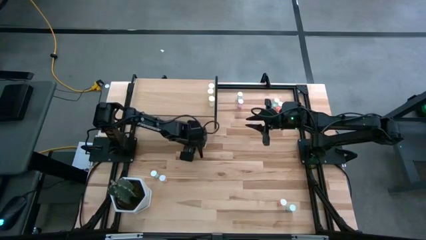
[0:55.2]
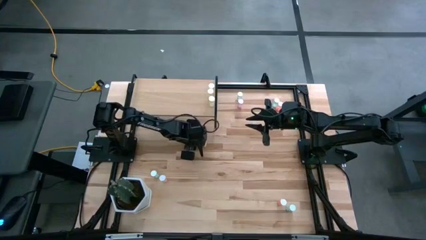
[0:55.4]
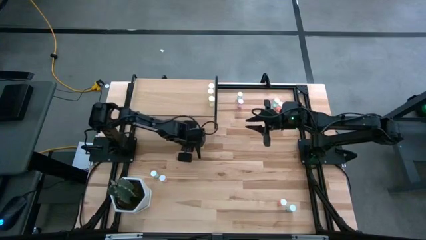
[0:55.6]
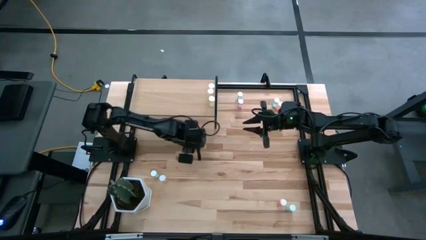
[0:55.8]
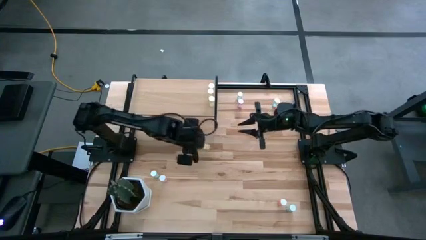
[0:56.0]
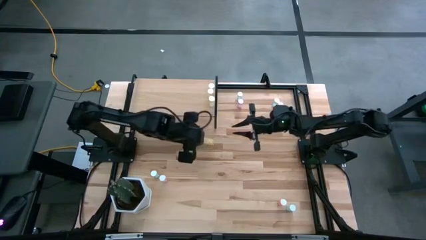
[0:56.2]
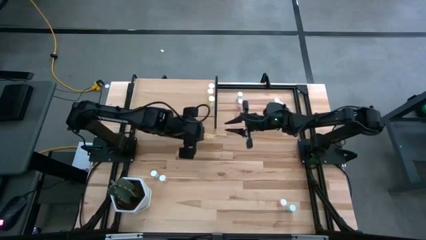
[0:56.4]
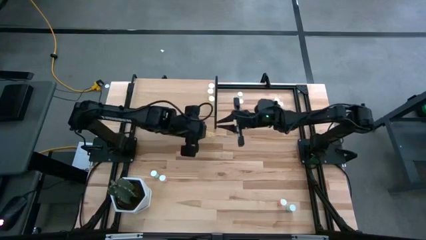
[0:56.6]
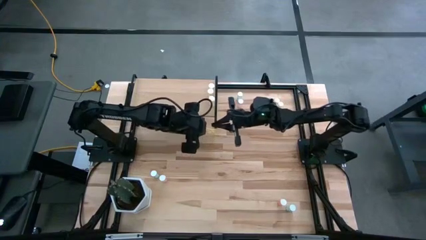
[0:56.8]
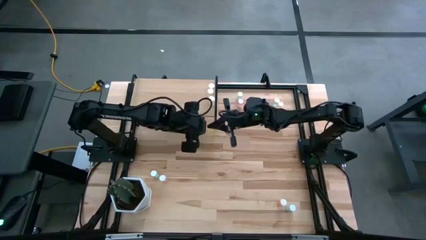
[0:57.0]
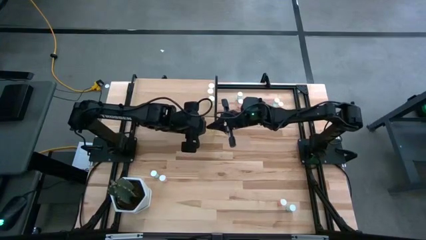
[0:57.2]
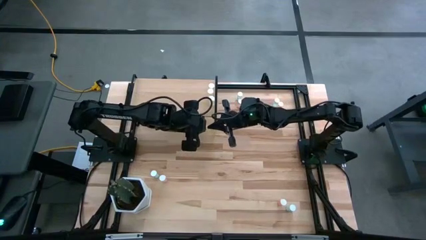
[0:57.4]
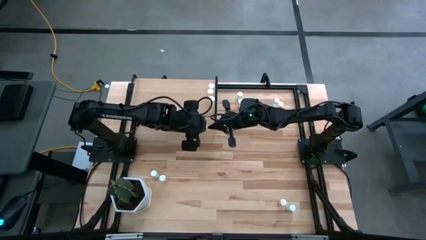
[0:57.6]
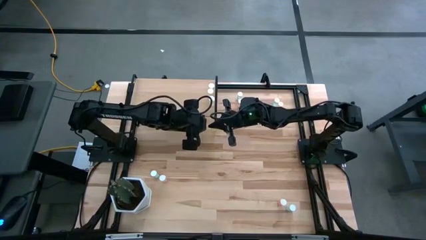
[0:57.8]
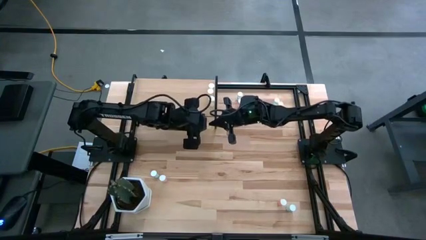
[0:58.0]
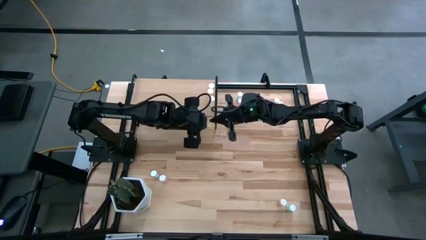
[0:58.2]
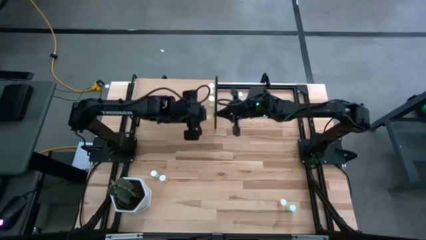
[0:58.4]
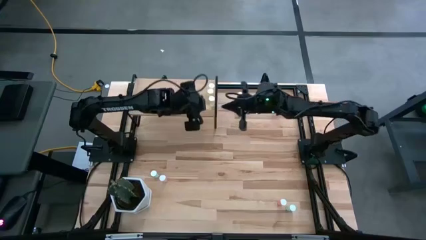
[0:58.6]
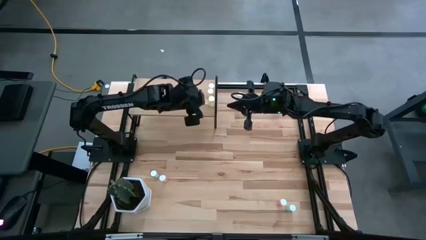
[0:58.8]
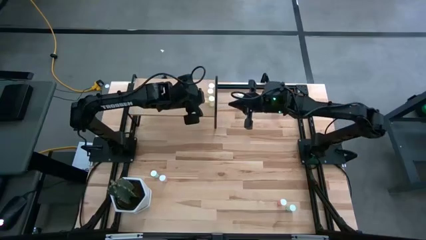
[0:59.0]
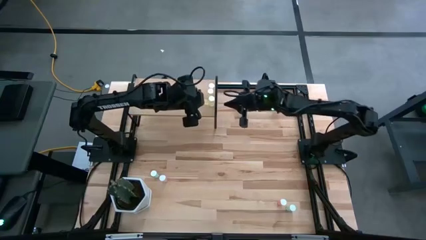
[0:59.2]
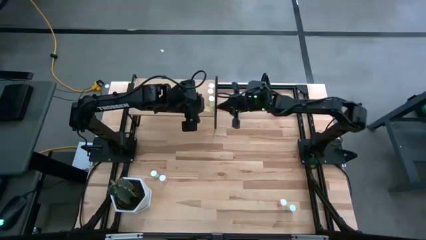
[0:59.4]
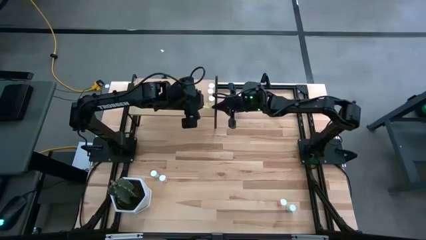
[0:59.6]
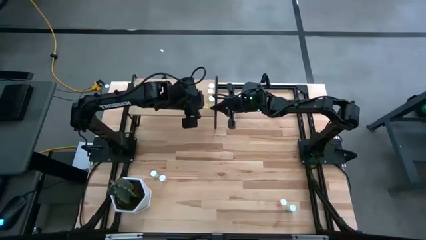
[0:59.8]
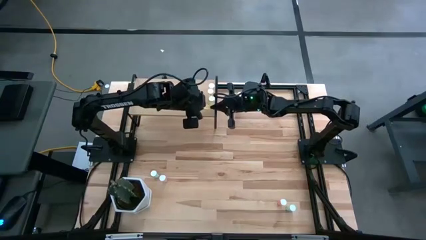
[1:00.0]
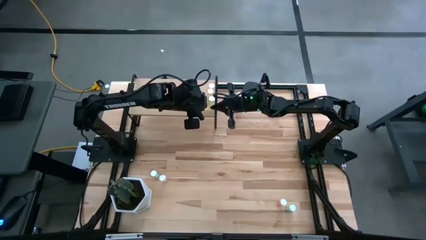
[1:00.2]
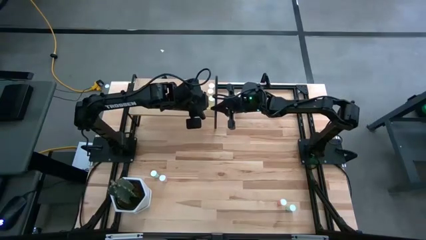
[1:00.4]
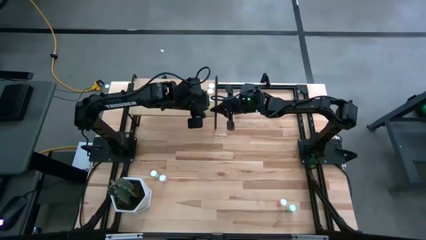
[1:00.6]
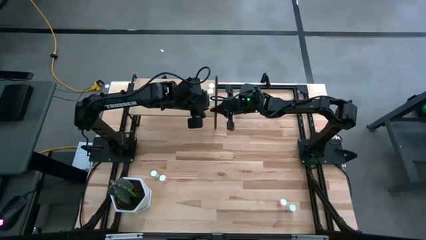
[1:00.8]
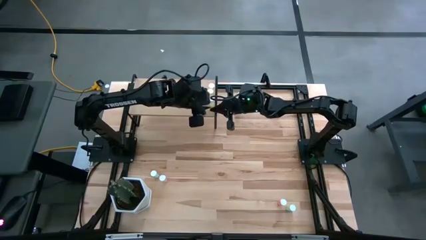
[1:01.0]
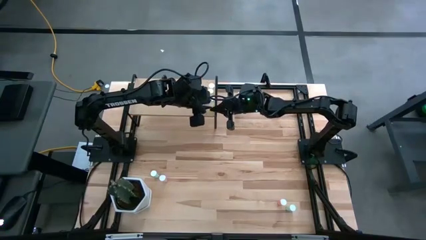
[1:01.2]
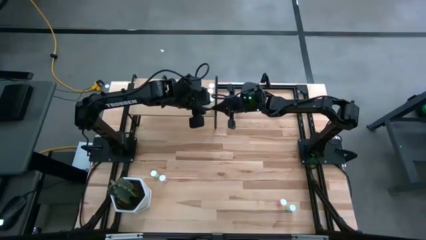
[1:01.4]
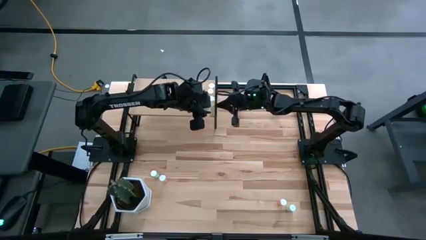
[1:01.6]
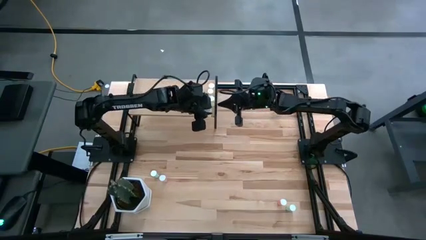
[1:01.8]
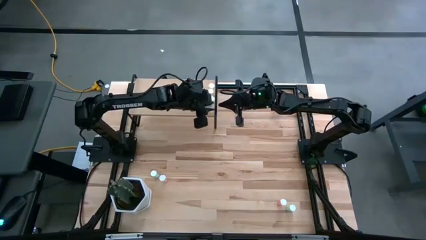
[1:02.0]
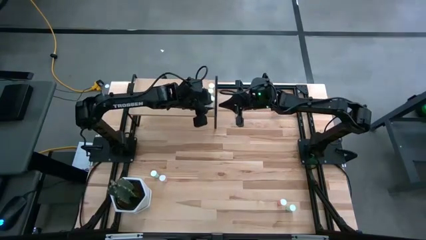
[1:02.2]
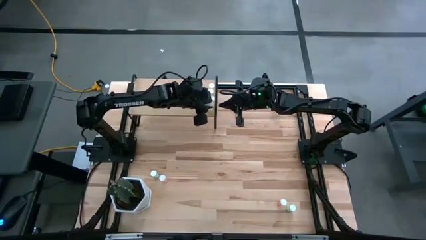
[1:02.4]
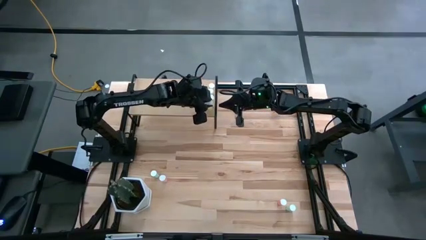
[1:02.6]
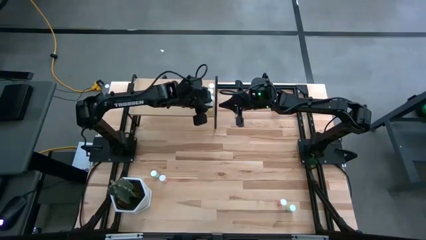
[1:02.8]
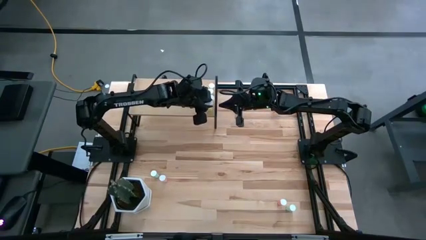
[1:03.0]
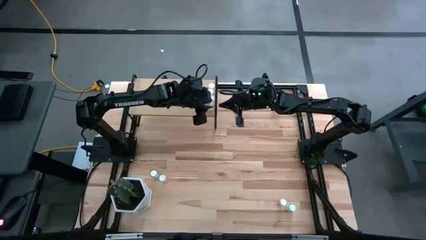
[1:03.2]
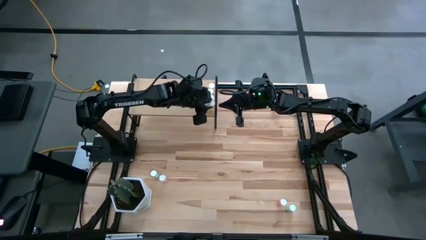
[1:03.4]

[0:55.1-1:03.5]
Task: Pick and place medicine bottles onto shelf by color
Put the yellow pill bottle on the shelf

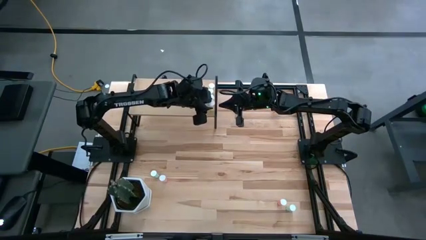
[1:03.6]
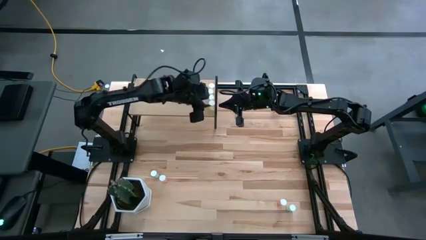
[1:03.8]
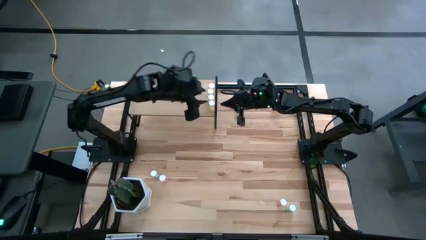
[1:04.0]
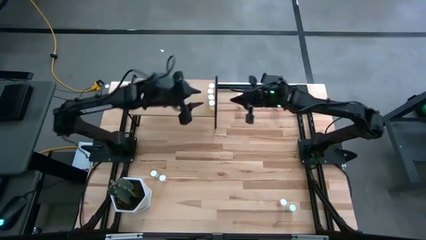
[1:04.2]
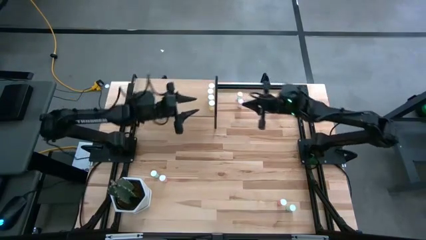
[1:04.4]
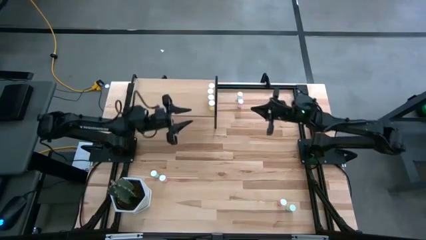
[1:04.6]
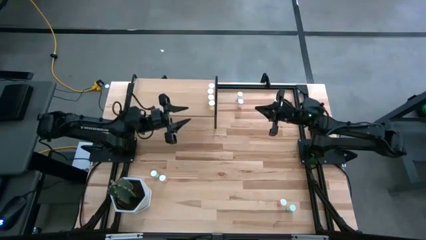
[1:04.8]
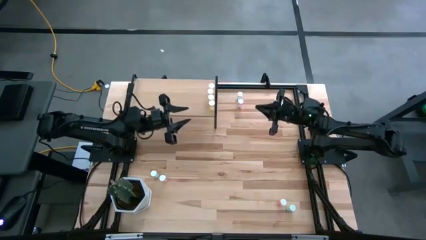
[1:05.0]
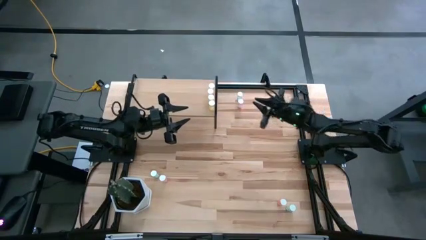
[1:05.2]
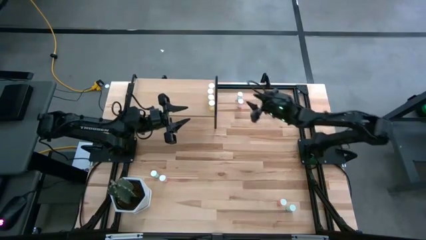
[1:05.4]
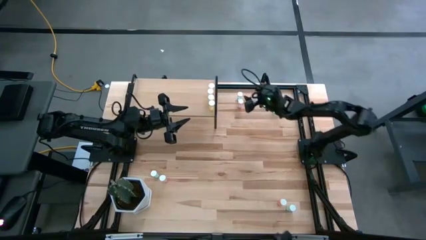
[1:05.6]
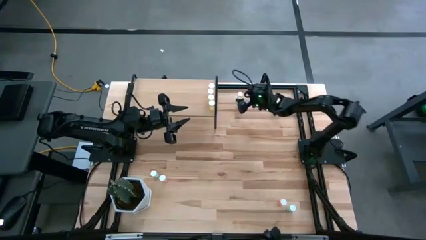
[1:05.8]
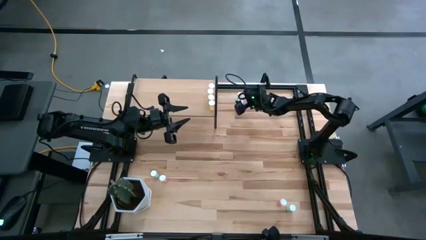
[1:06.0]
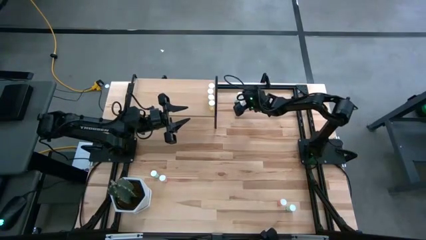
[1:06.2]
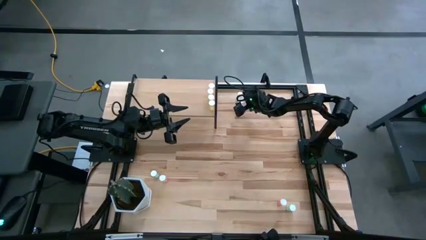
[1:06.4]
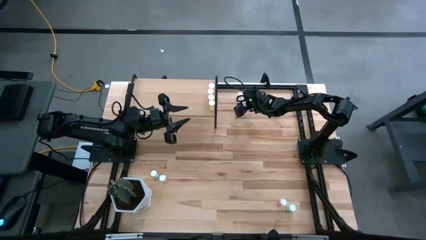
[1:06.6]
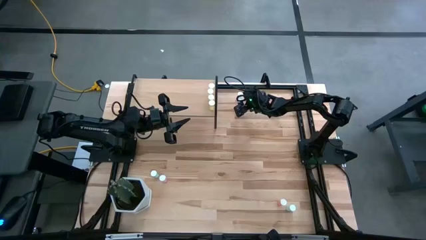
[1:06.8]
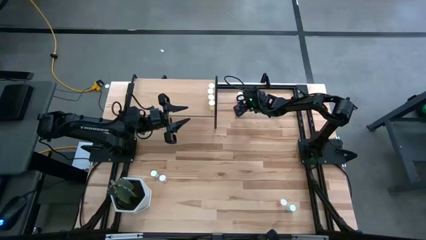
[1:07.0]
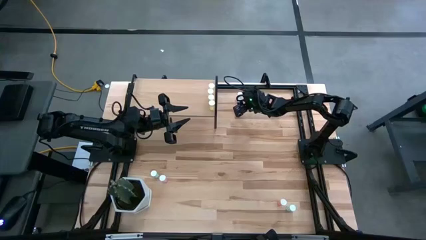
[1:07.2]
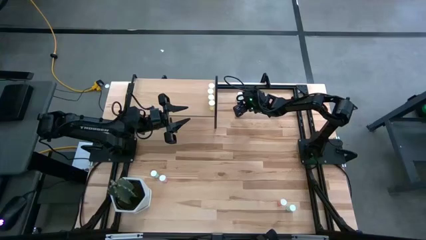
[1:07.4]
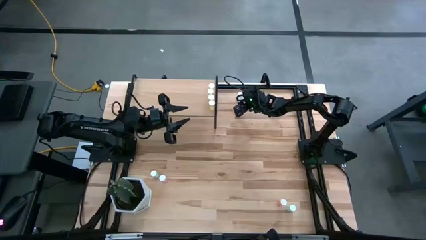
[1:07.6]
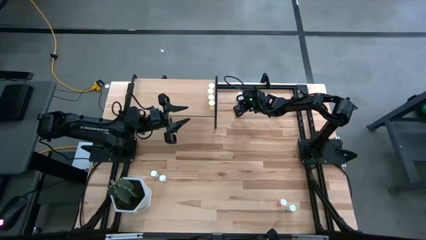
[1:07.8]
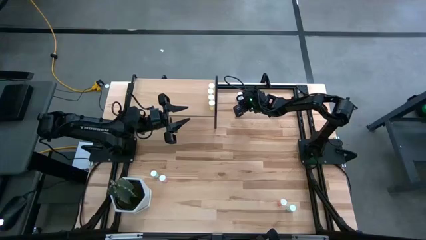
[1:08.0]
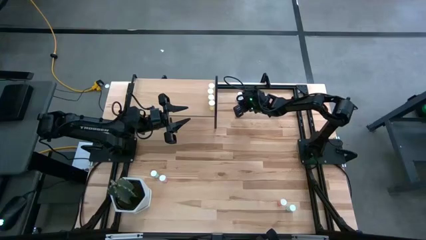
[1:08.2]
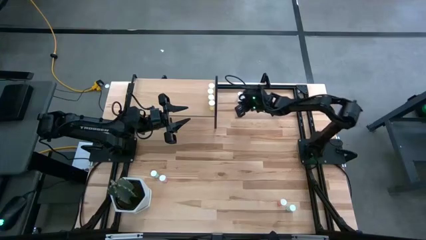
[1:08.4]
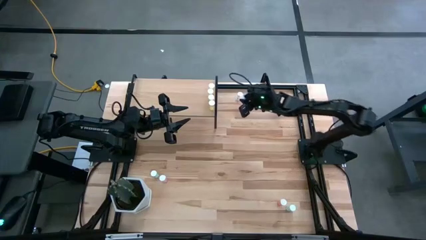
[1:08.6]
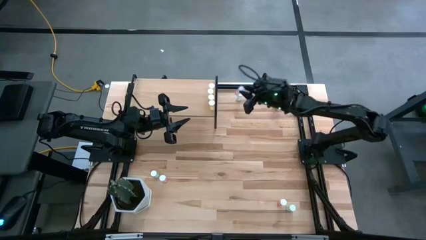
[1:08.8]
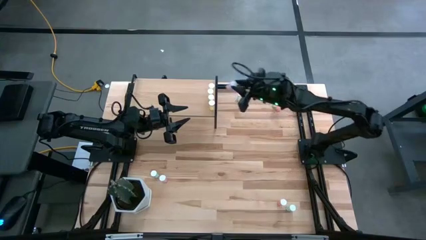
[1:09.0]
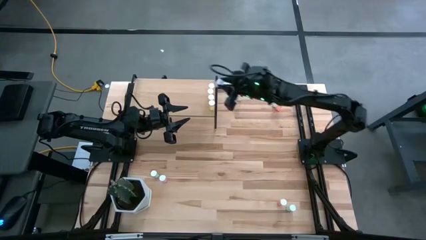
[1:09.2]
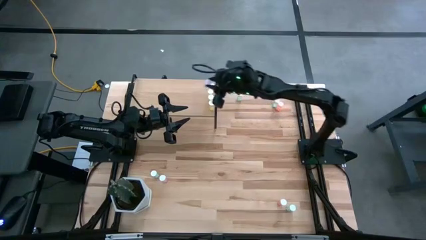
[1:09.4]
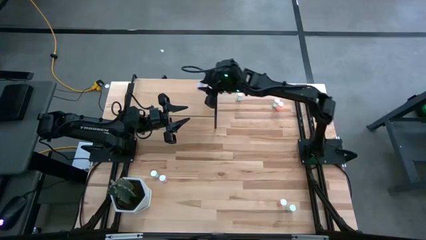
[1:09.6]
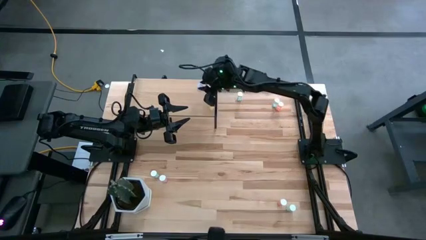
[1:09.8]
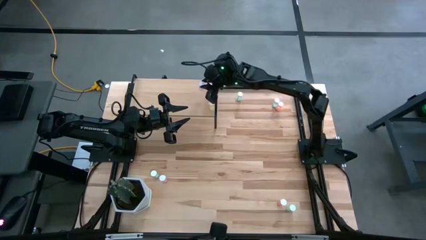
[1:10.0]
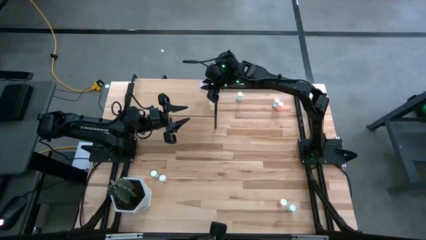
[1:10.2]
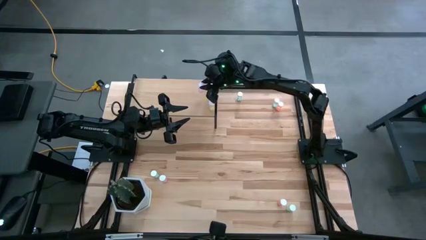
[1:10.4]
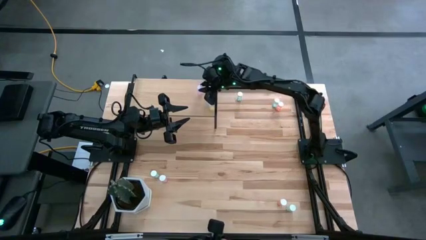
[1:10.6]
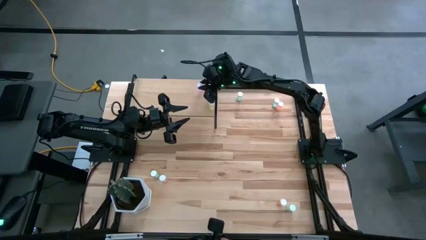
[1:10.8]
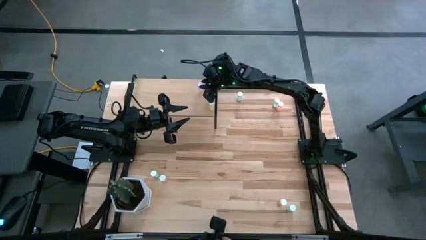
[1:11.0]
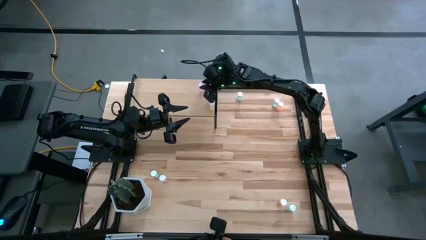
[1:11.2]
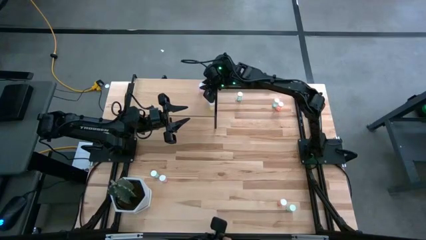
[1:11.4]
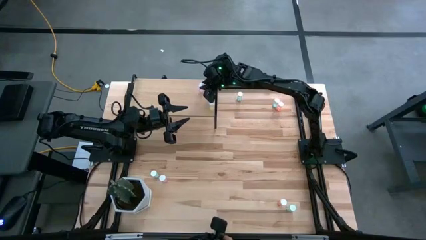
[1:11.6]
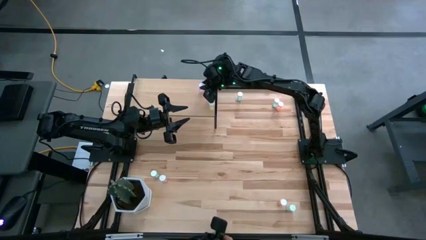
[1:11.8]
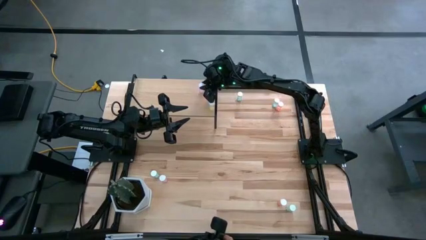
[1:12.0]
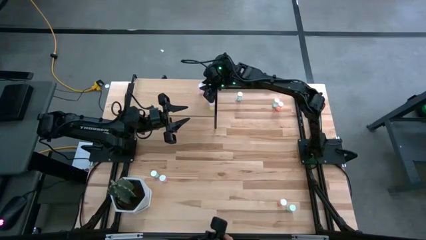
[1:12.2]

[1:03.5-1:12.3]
Put the top pink pill bottle on the shelf
